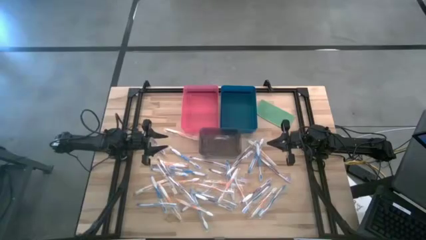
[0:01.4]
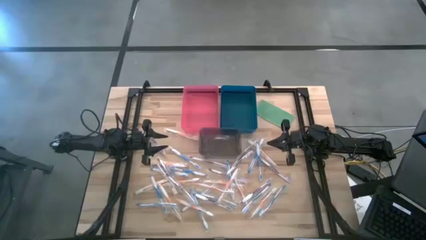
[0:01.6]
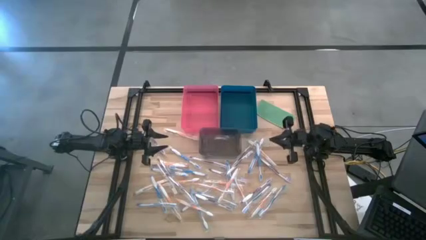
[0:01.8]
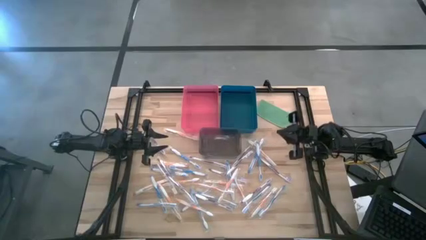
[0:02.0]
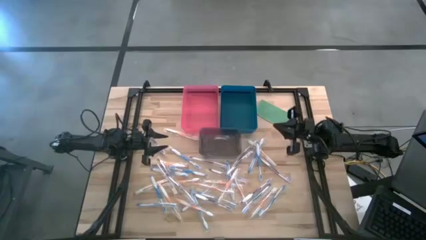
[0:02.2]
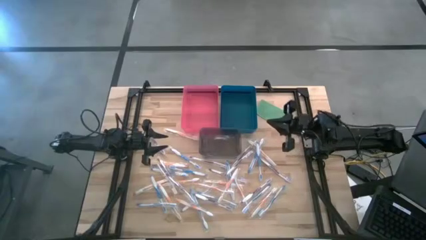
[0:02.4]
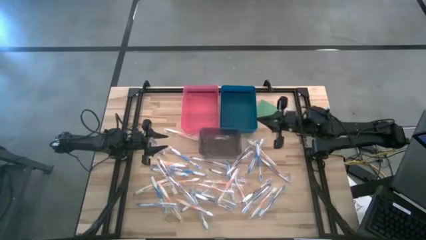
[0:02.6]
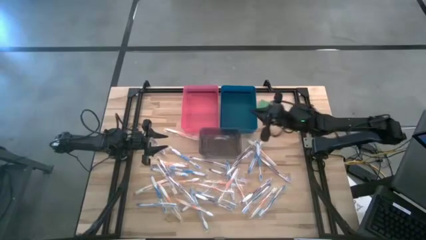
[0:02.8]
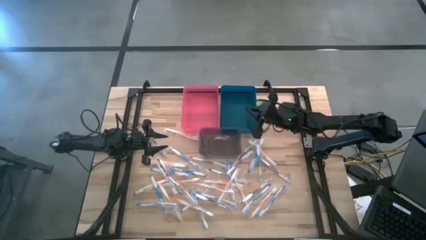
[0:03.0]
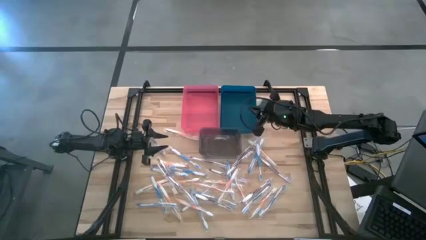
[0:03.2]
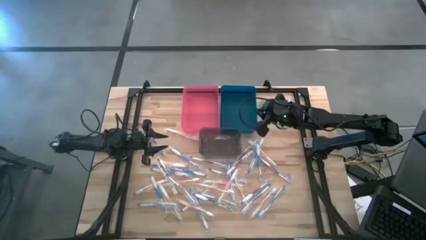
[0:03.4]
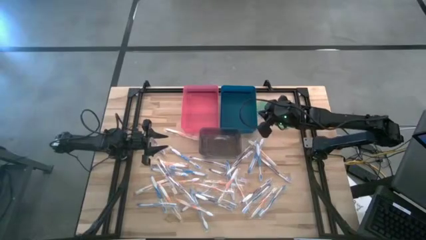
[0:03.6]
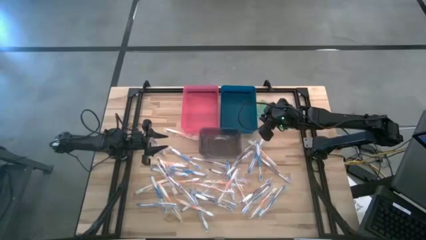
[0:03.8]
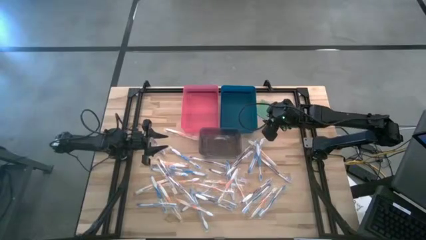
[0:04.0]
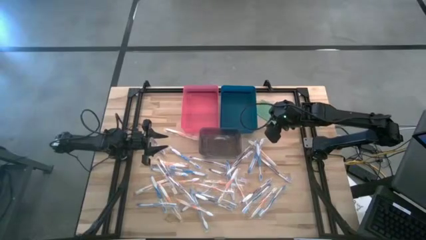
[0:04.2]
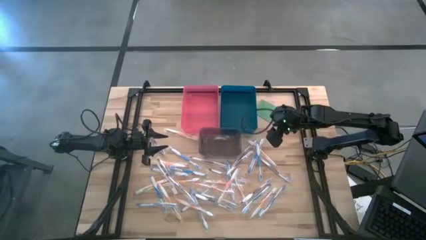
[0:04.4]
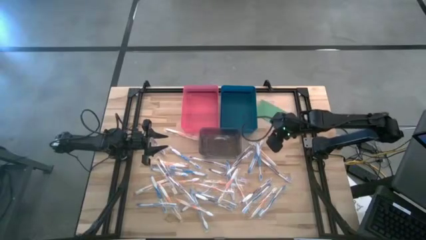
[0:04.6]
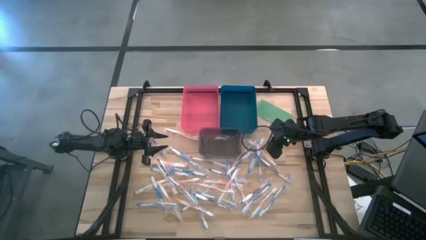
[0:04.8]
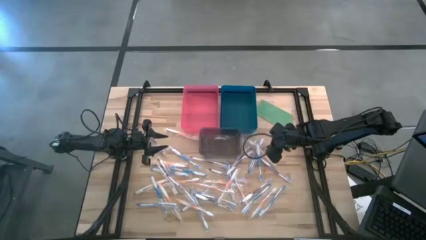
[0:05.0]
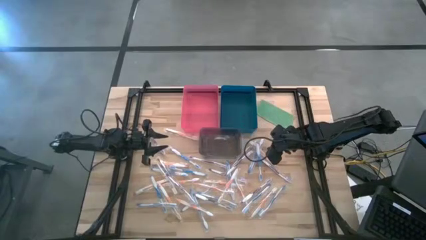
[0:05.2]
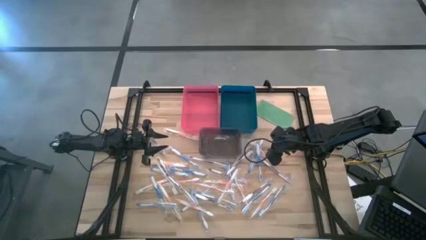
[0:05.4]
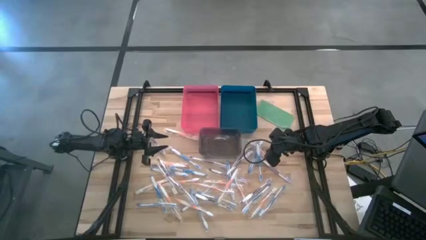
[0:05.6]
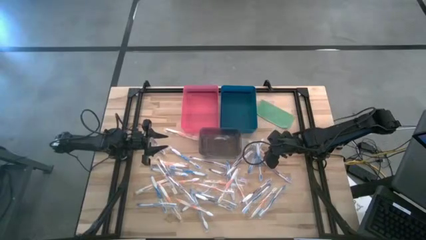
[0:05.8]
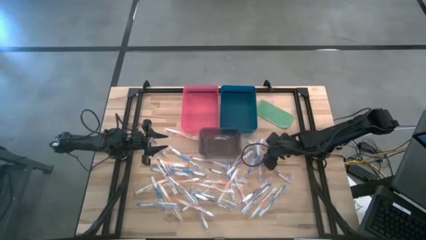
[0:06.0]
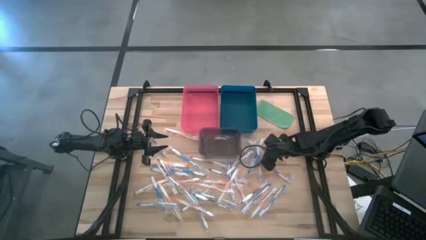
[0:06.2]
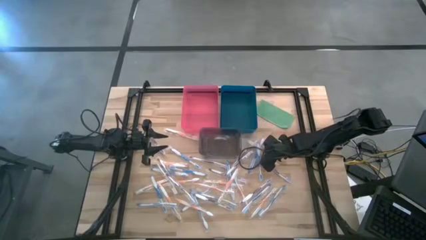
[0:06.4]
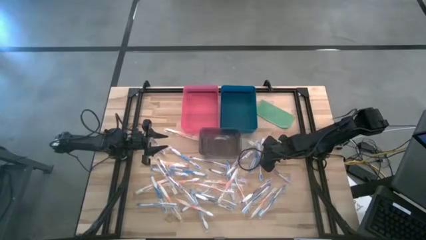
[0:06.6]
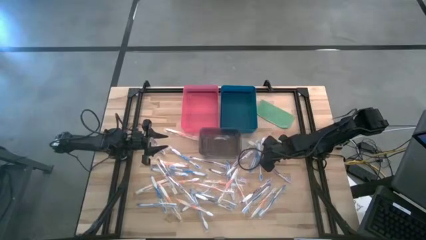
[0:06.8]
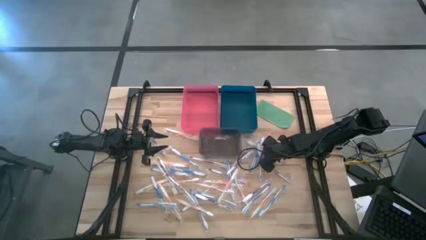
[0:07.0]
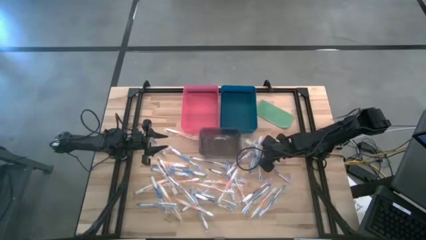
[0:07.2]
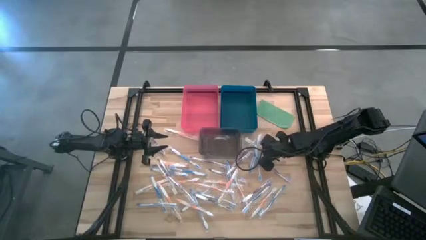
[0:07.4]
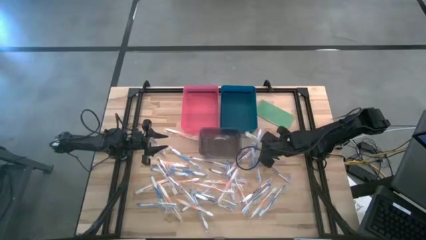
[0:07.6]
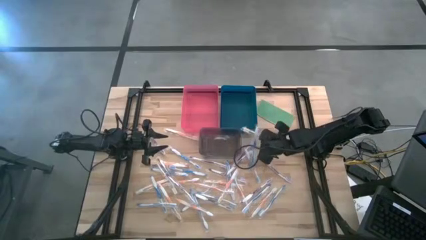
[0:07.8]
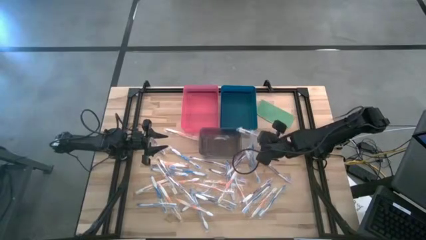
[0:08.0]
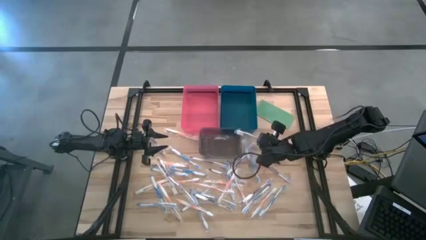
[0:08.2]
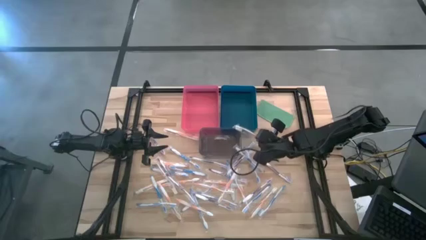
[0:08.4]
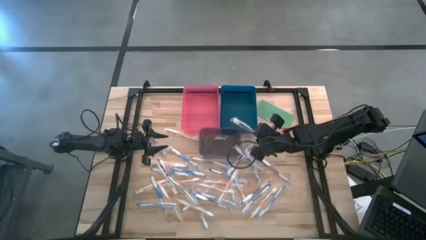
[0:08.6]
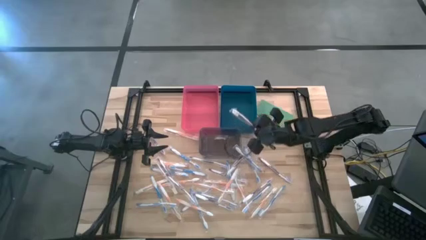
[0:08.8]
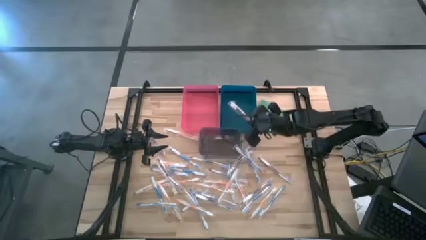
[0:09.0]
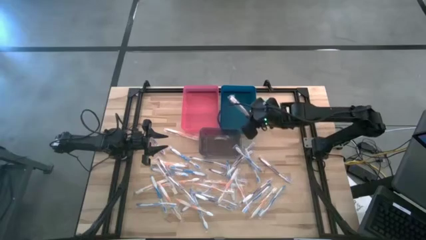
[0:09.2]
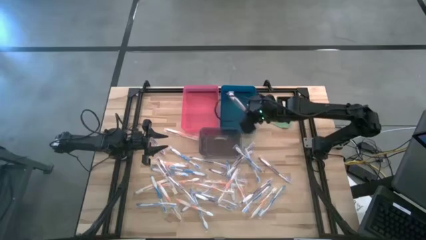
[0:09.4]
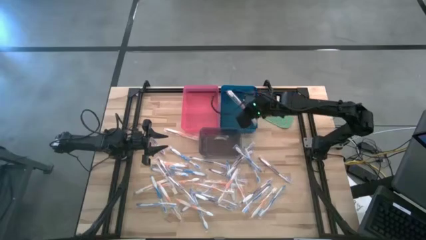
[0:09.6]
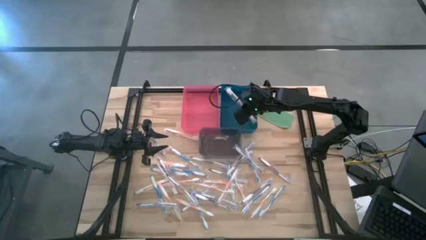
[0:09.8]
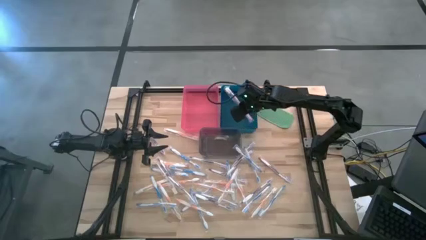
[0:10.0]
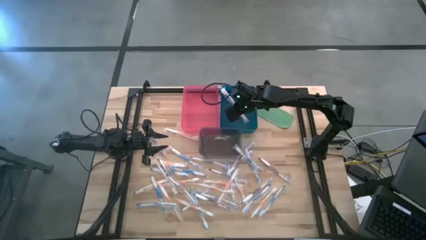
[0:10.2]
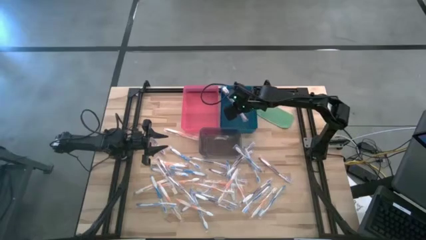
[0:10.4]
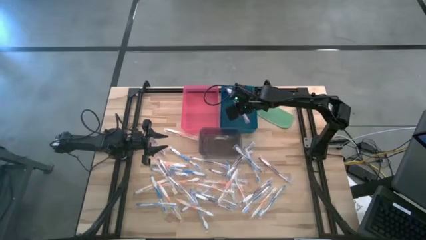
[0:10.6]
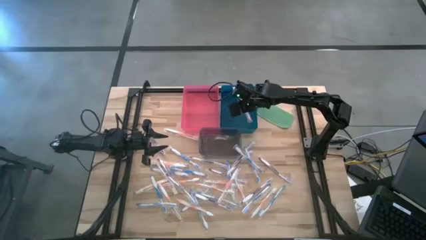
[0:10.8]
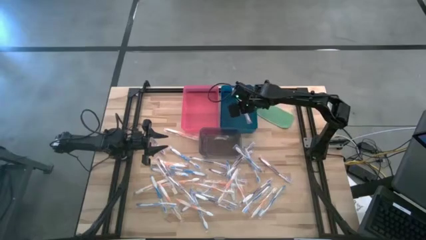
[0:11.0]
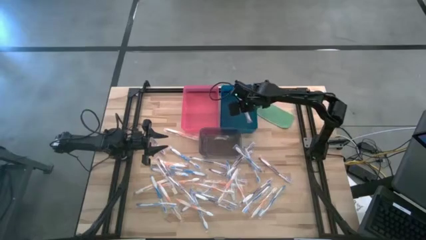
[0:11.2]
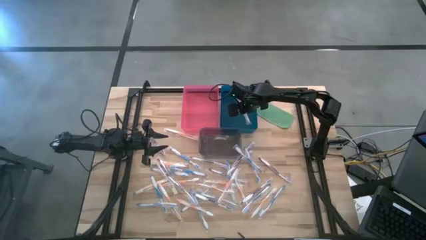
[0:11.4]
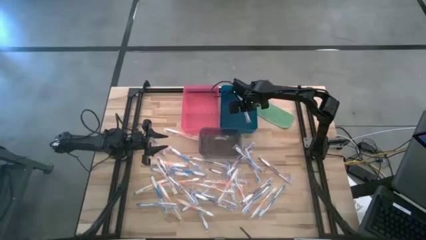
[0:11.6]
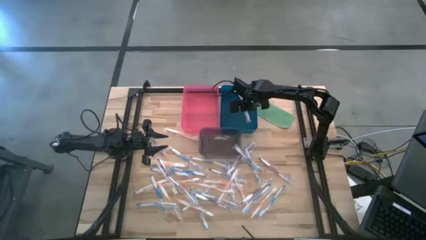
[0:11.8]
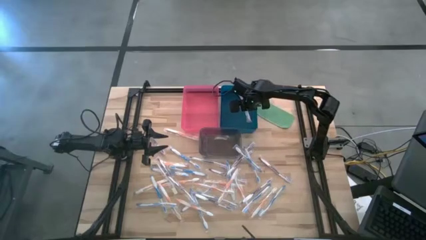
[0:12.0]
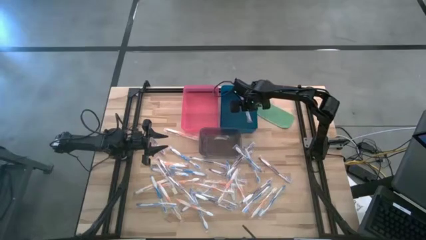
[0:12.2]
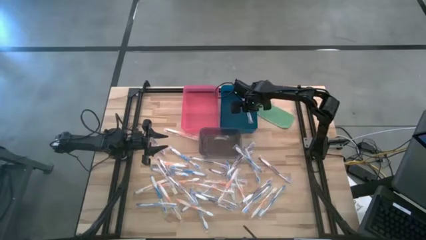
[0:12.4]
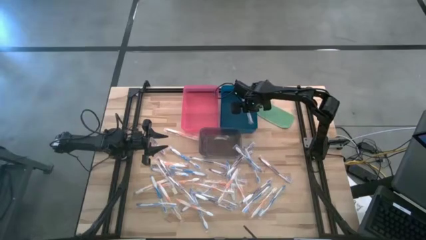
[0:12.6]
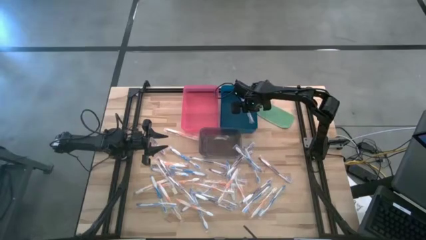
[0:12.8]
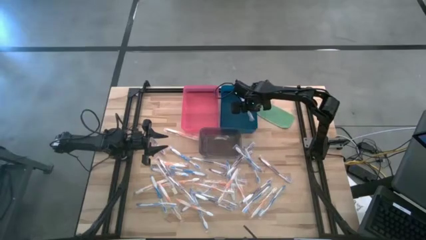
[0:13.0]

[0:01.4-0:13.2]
Task: Pick & Place Toothbrushes
Put the orange toothbrush into the blue bin
